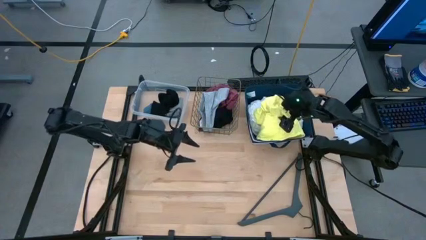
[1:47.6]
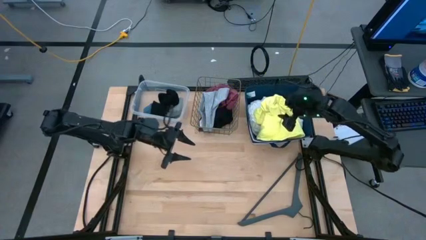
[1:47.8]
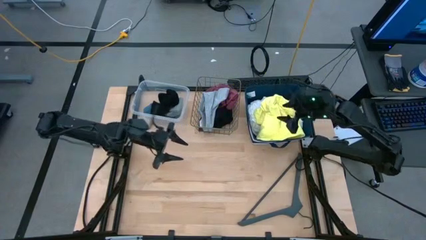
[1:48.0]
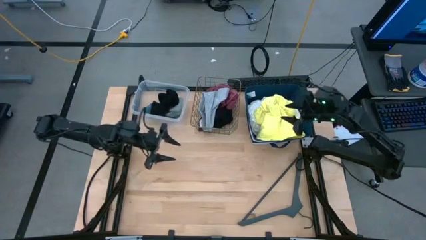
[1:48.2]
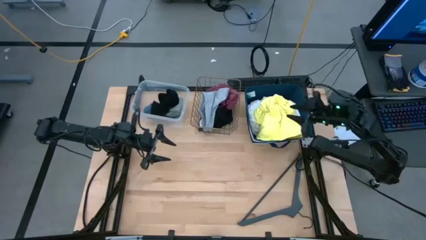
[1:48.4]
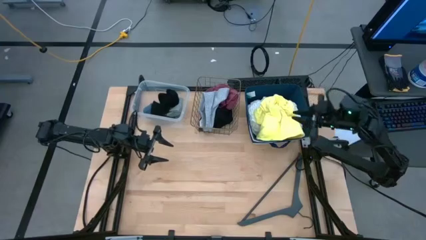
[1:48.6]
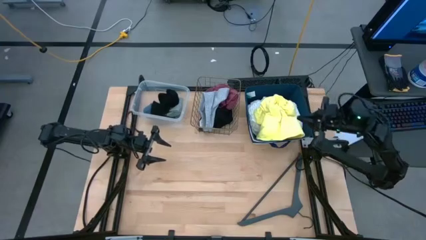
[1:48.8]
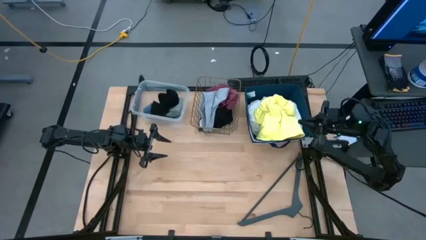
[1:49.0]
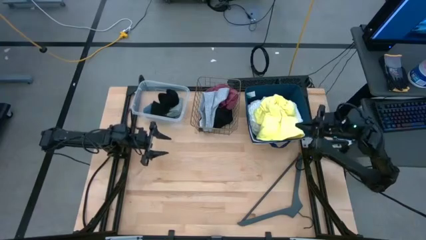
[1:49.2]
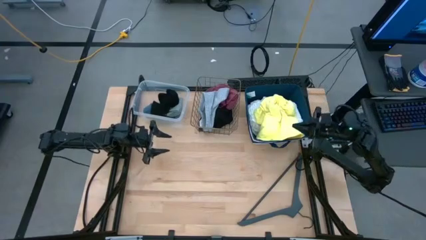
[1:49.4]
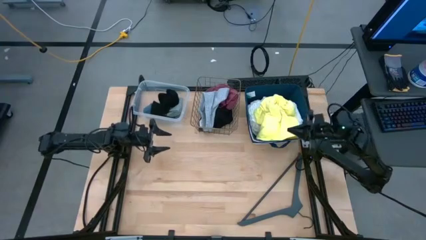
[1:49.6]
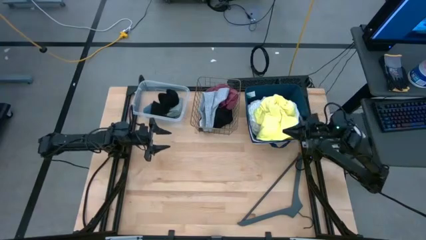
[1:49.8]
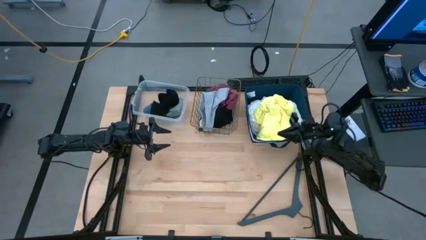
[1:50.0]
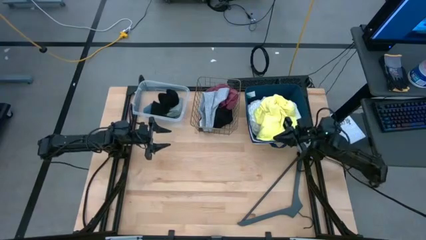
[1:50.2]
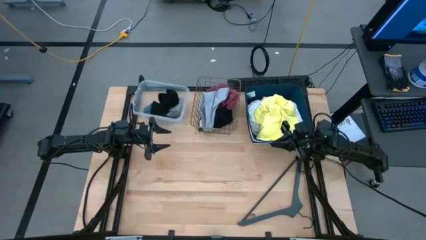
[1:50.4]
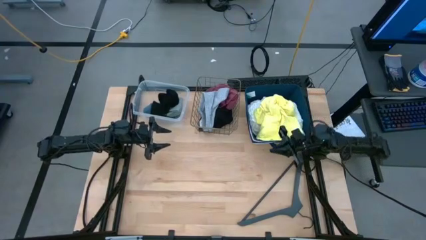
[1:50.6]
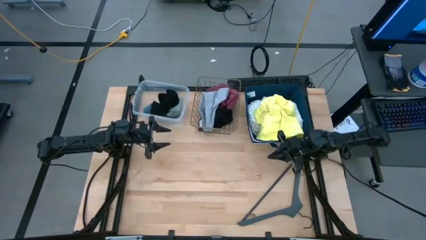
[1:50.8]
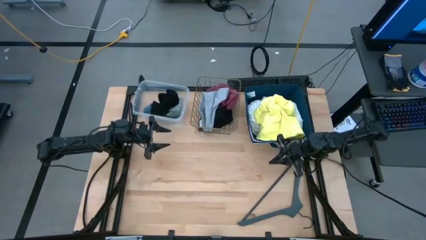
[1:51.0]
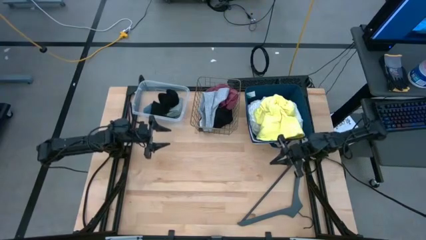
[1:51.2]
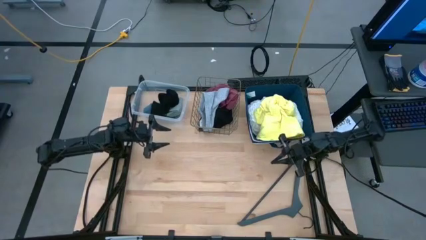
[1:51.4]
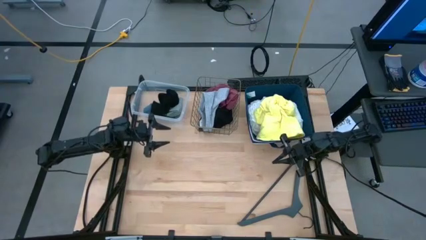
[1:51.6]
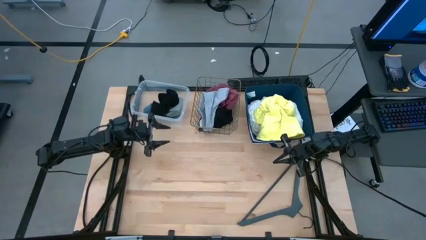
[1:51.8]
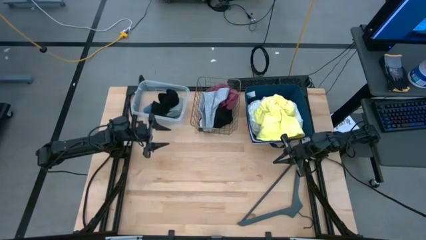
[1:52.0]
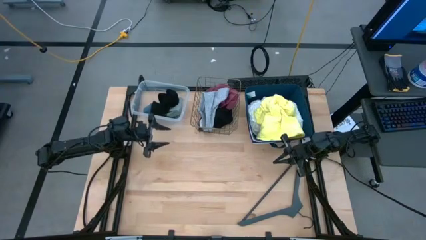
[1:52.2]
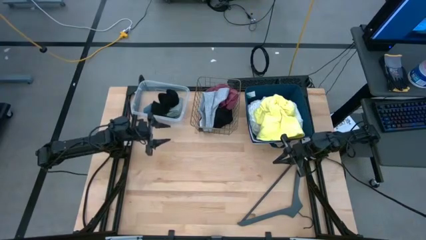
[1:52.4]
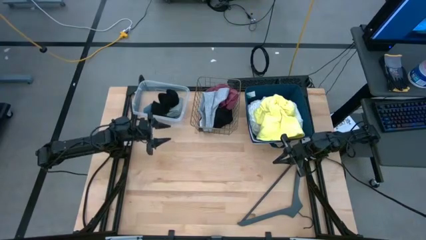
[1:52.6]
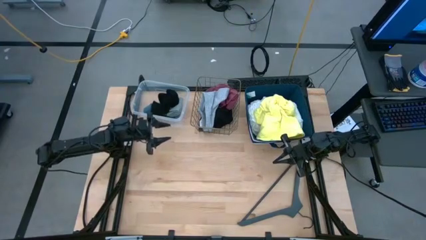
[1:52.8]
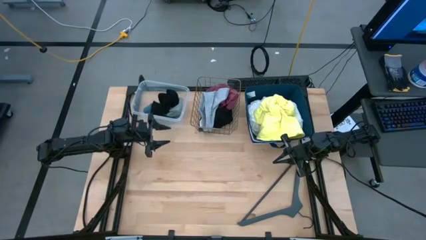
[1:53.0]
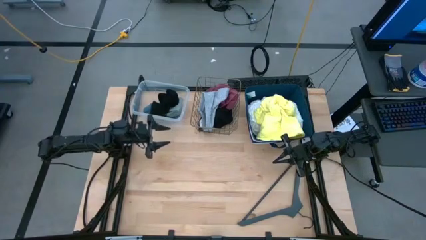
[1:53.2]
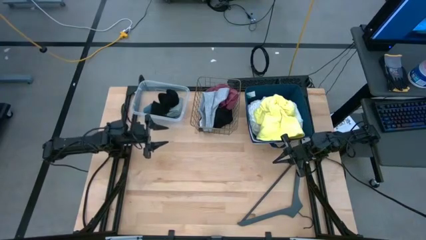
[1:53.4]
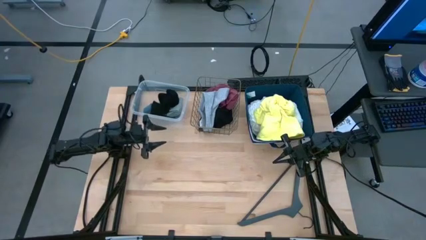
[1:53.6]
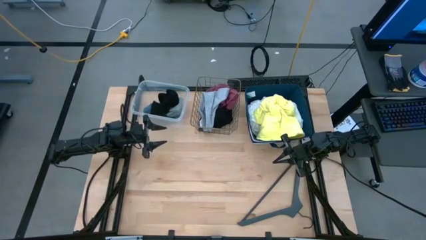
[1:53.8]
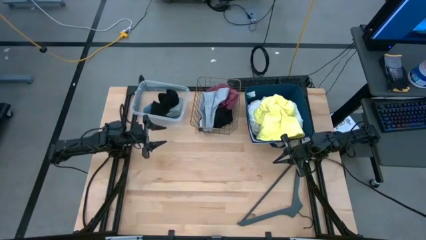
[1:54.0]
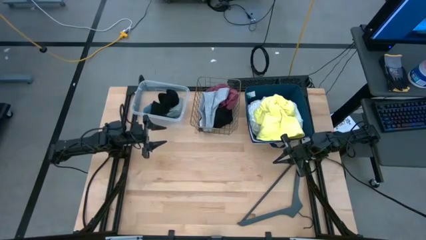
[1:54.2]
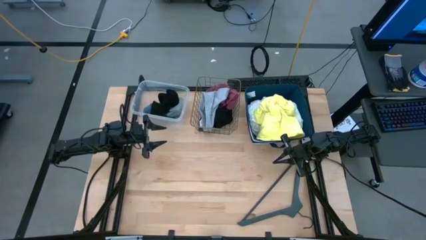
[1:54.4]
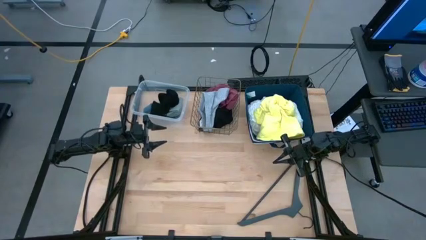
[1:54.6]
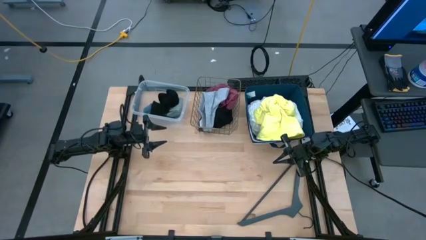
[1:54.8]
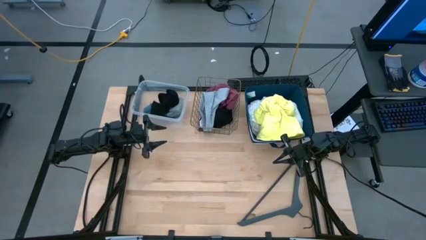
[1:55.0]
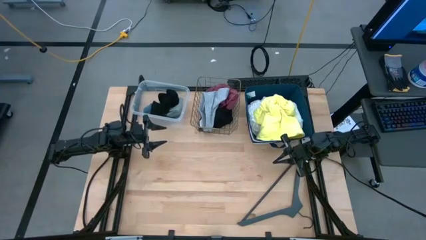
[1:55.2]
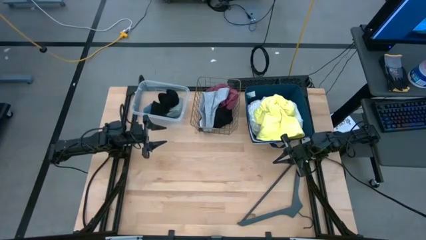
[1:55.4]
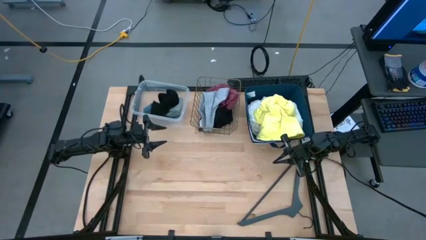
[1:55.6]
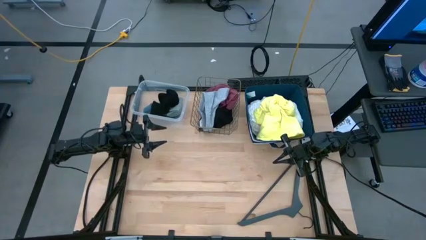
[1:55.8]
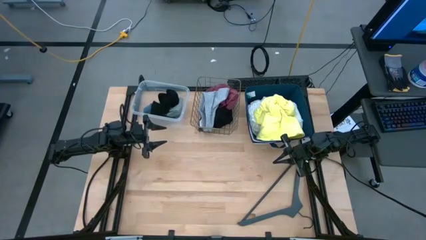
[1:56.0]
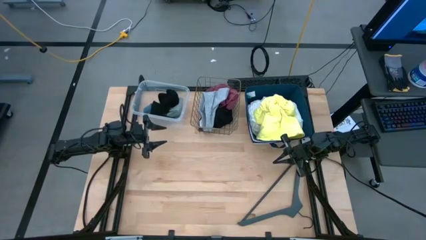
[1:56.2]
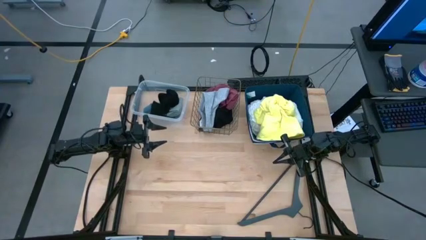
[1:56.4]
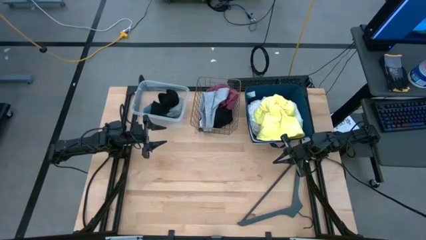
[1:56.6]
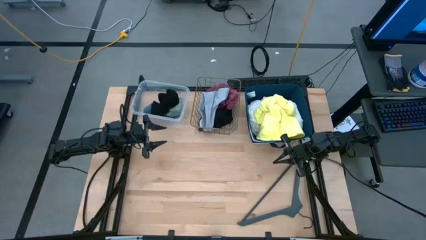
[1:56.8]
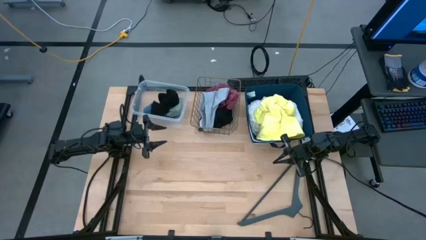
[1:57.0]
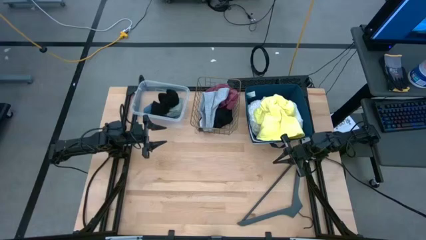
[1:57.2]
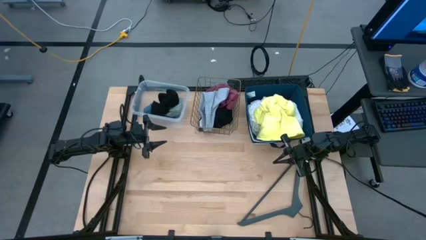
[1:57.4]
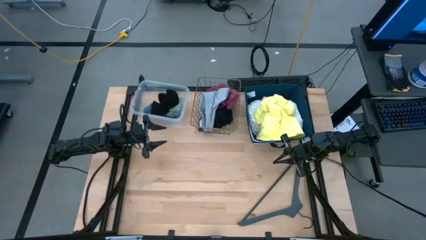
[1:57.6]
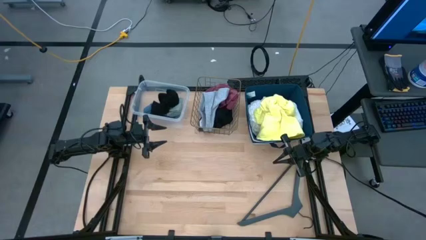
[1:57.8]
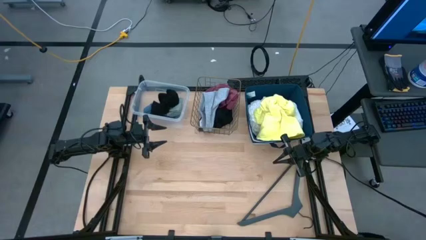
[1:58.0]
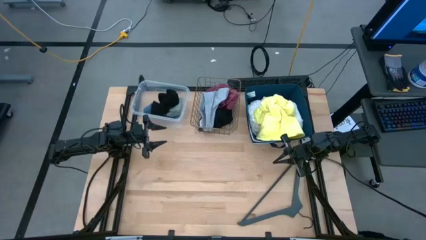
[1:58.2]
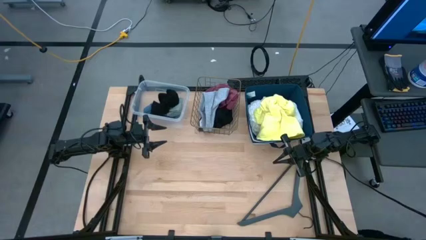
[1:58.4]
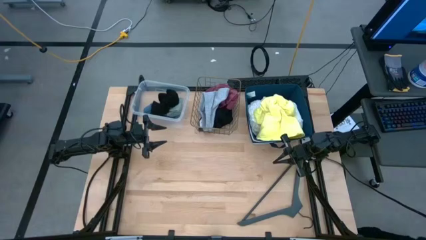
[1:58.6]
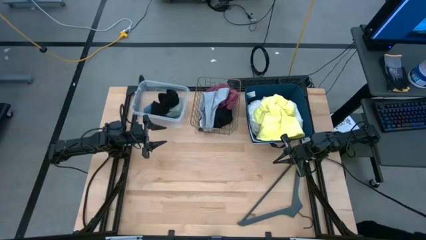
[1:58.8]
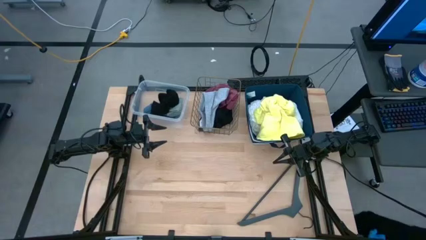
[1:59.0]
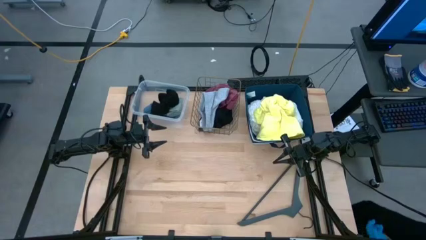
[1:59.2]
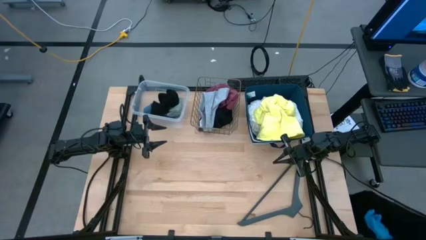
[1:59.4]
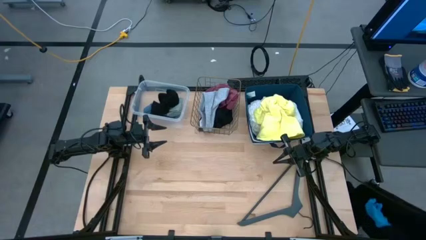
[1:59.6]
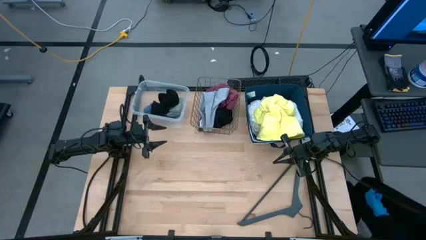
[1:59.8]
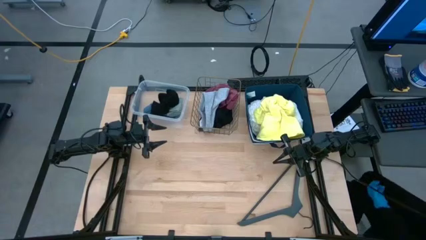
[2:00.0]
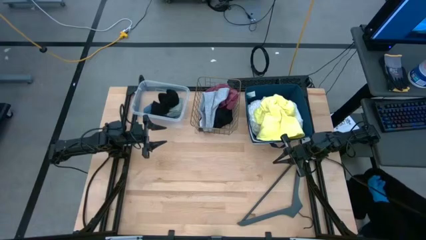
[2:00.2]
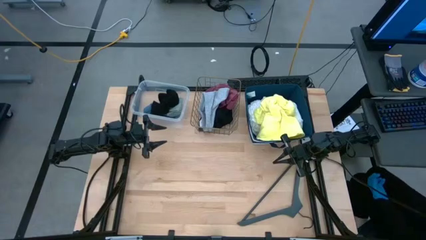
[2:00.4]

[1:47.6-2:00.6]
Task: Pick & Place Cloths
Return to Home Position
